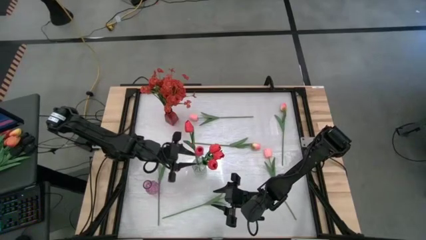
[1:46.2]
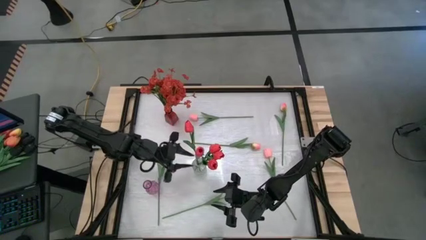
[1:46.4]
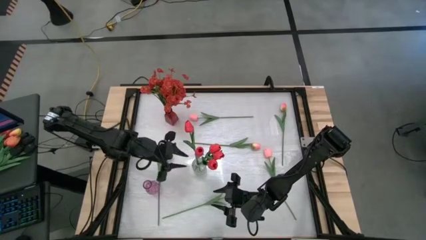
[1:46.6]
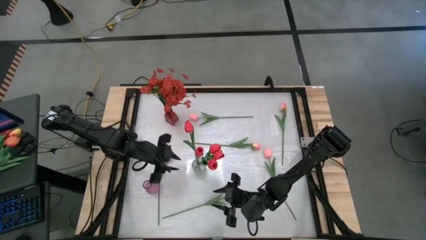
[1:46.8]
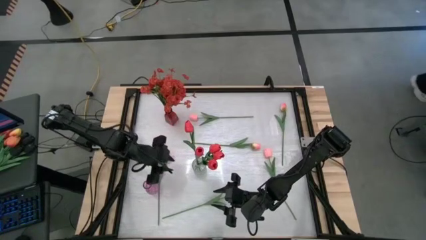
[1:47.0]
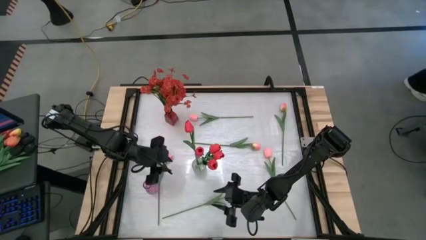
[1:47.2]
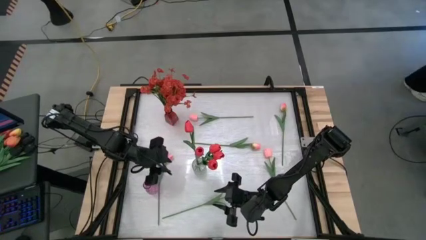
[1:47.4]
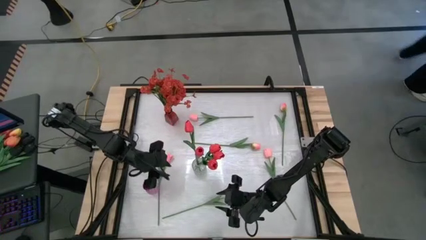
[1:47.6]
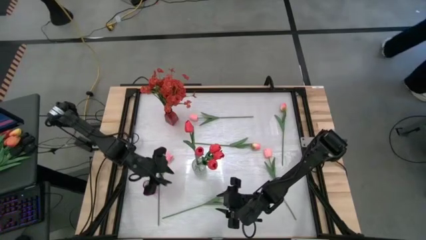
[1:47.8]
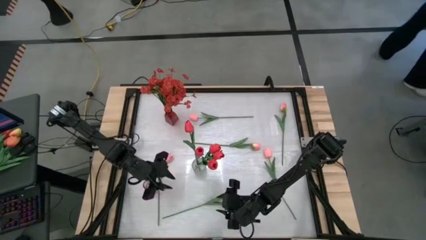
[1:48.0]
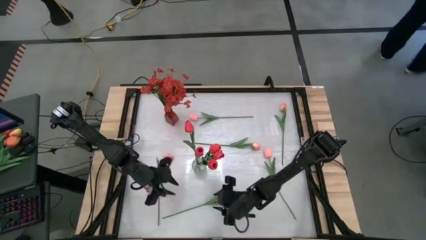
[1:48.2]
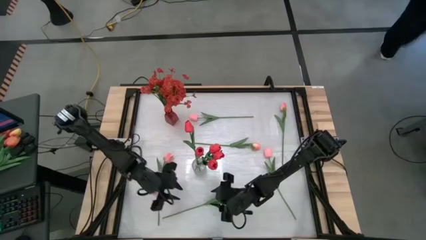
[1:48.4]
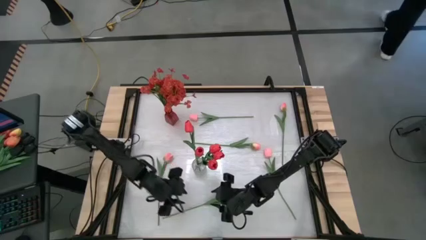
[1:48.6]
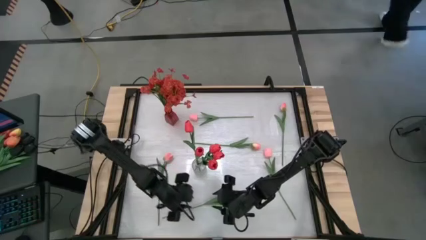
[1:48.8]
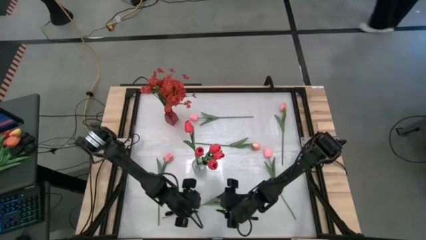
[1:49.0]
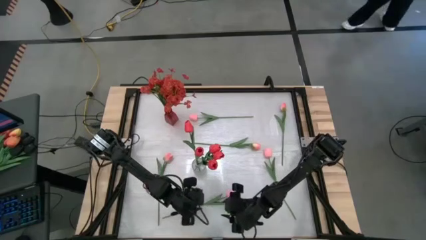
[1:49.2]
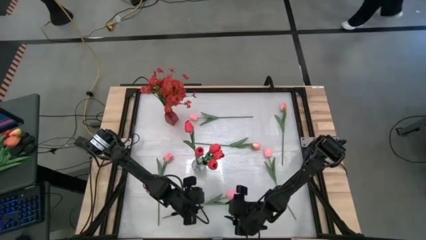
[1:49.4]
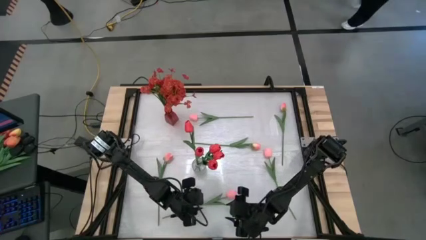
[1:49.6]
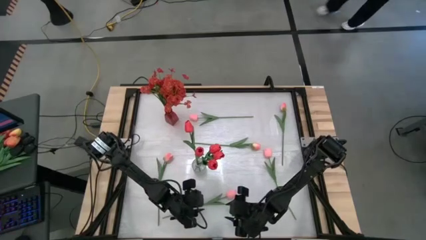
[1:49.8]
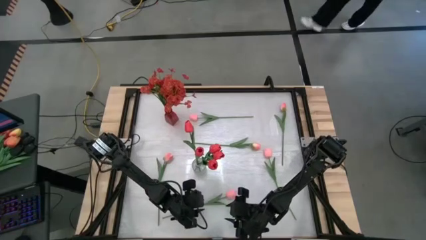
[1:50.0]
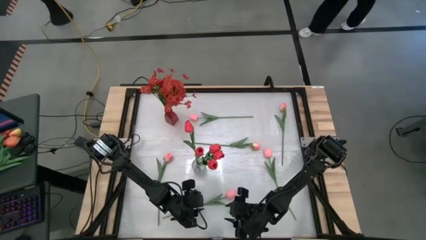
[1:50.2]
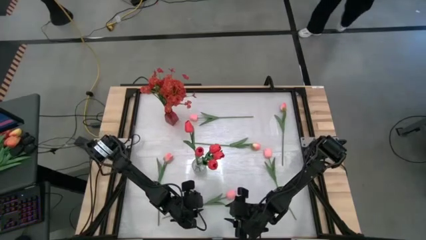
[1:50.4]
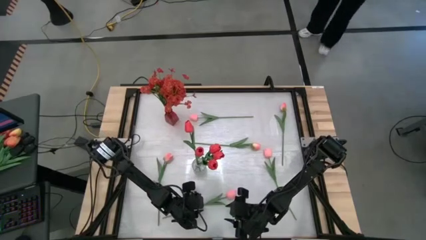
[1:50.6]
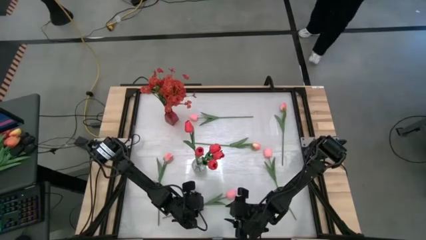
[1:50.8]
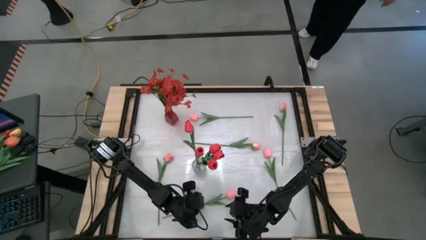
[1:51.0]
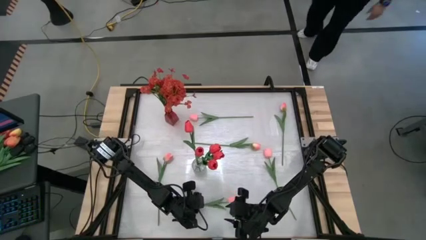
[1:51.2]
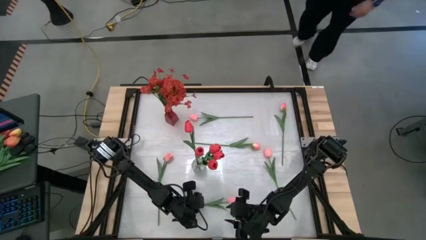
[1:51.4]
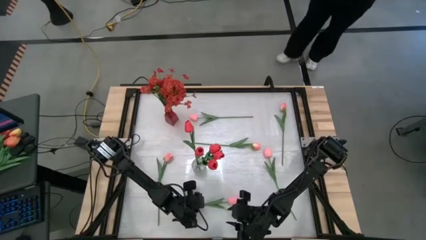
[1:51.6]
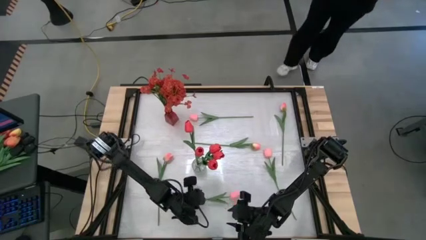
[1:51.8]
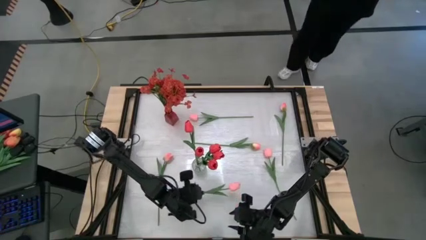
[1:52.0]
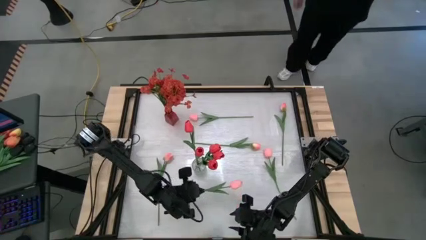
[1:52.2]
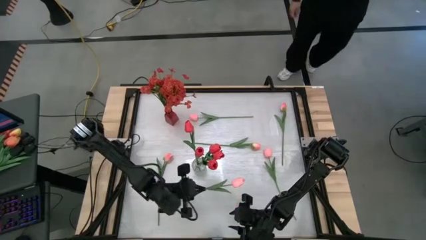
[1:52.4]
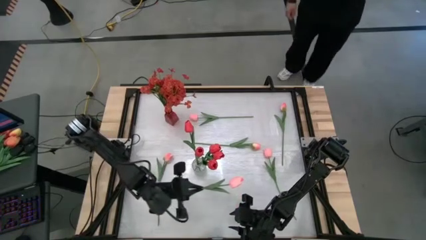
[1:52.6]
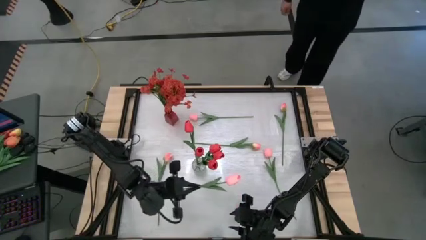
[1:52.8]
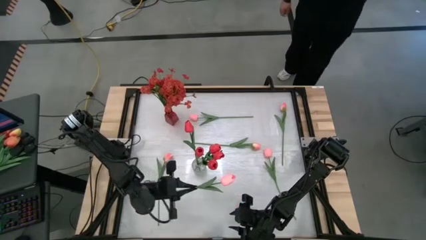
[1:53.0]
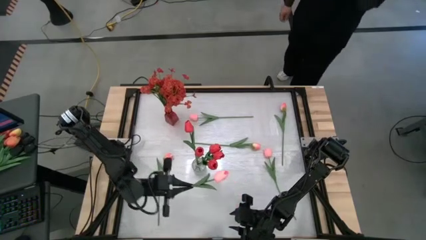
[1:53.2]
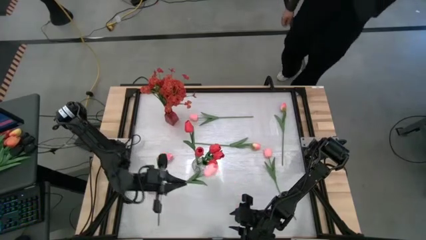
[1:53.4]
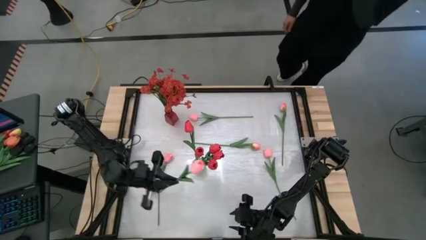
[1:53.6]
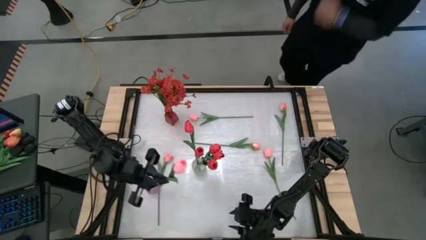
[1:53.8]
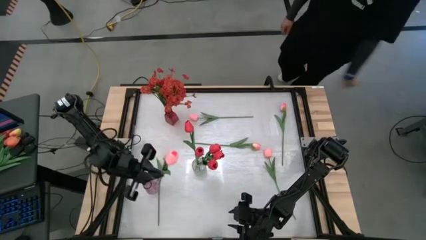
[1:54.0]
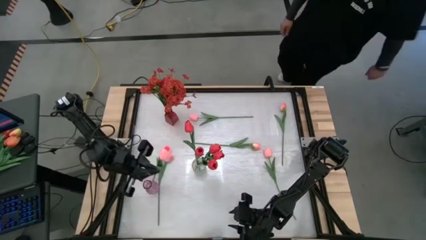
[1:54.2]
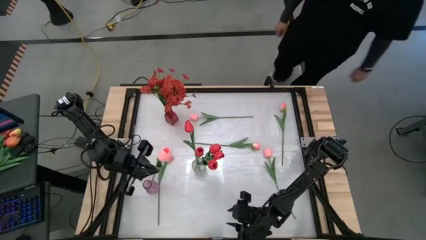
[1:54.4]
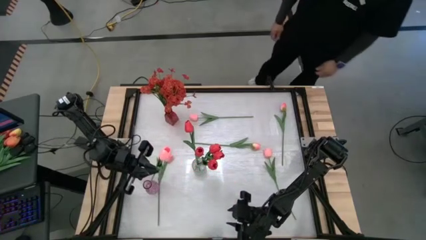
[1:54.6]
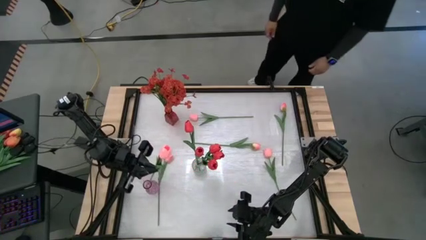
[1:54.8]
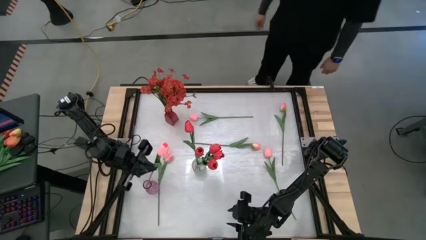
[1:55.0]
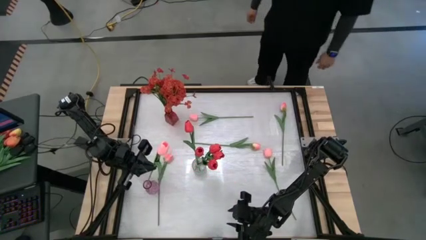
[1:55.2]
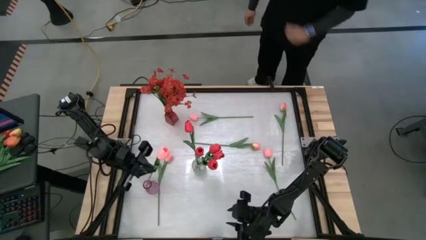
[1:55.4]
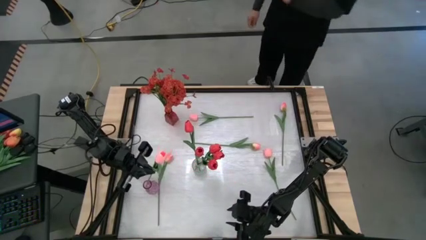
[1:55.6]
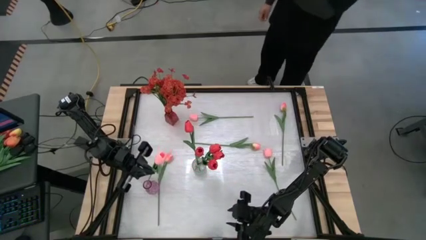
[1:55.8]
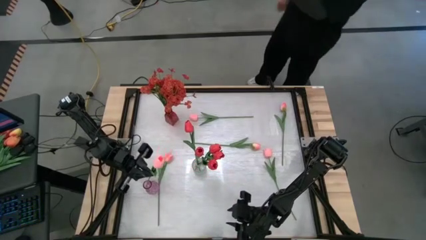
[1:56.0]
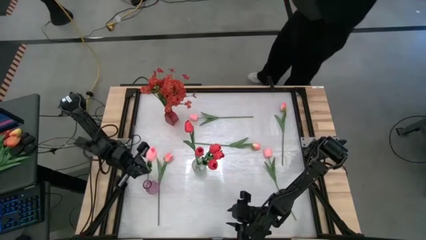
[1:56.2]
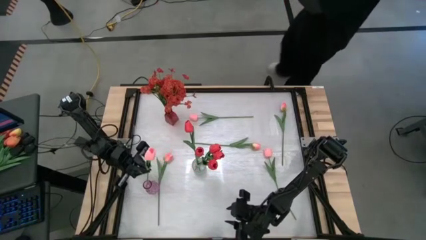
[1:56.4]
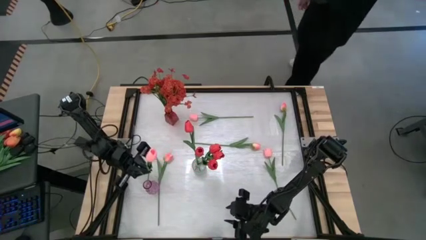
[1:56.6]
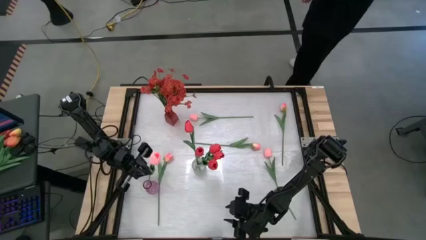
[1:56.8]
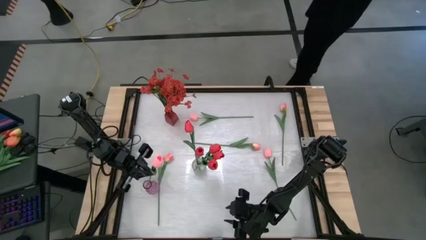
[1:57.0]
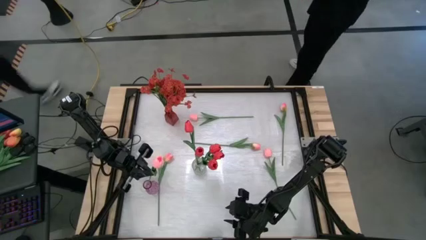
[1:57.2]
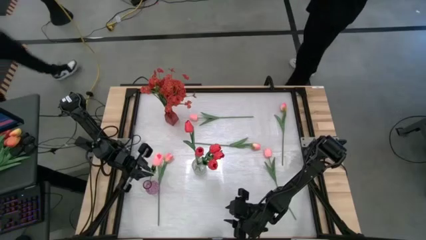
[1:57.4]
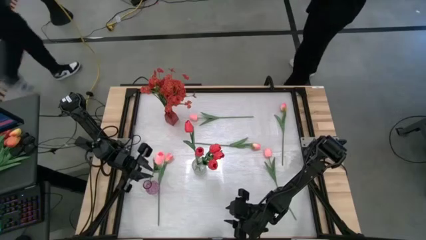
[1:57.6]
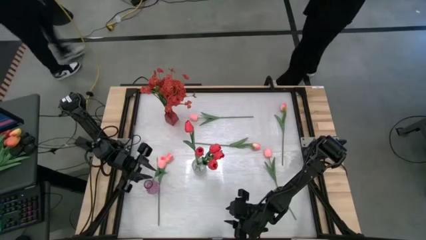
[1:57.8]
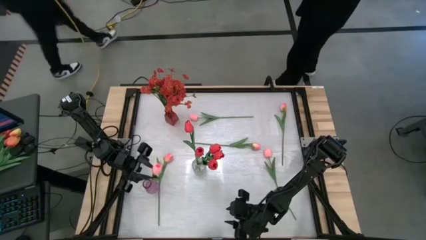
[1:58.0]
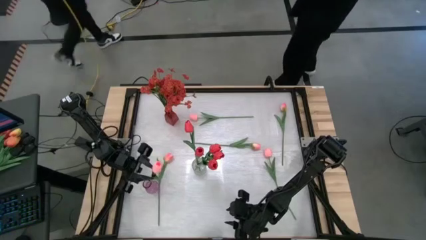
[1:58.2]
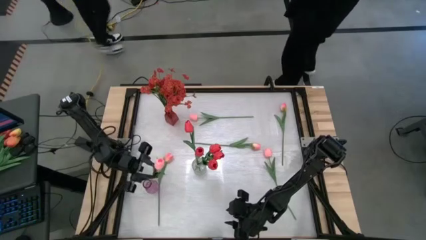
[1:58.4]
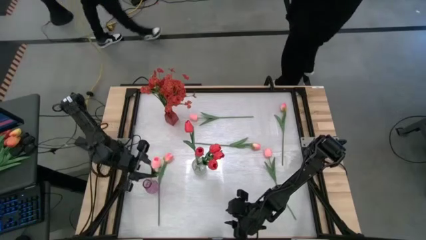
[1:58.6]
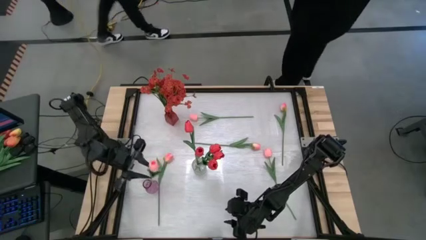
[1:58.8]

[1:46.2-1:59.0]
Task: Sort flowers into vase by color
Put the pink flower into the purple vase
